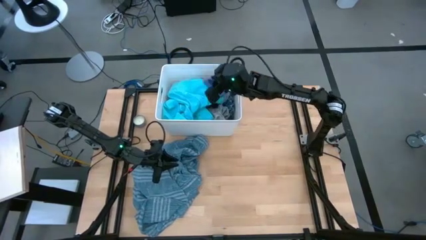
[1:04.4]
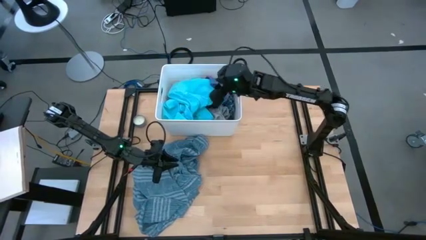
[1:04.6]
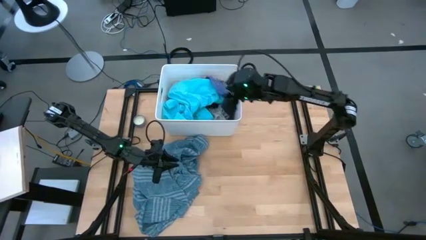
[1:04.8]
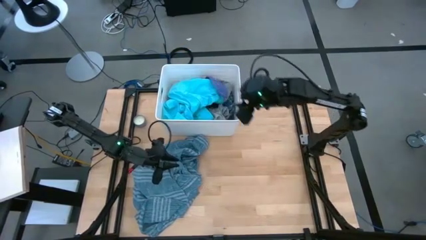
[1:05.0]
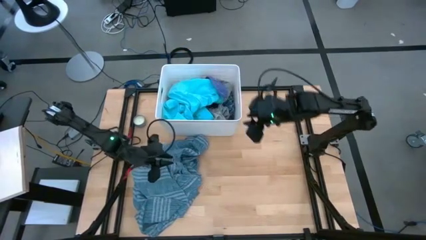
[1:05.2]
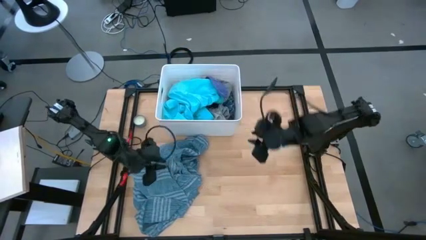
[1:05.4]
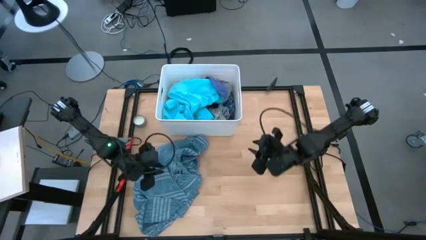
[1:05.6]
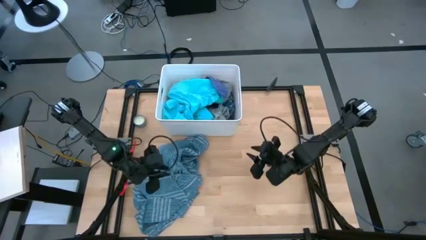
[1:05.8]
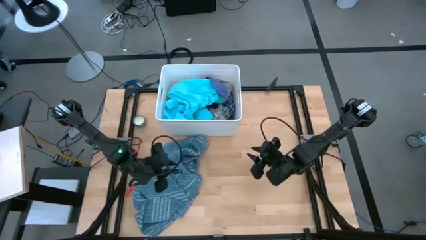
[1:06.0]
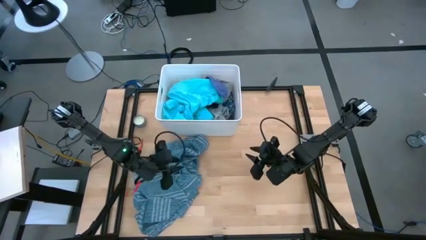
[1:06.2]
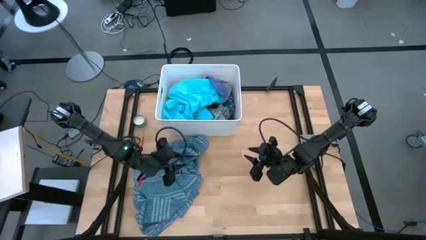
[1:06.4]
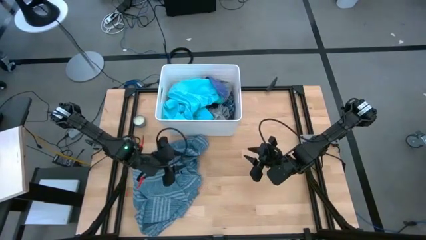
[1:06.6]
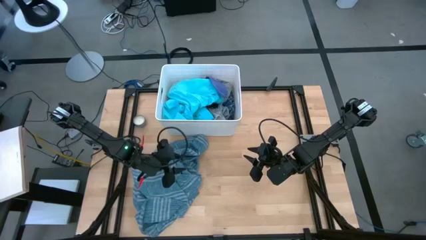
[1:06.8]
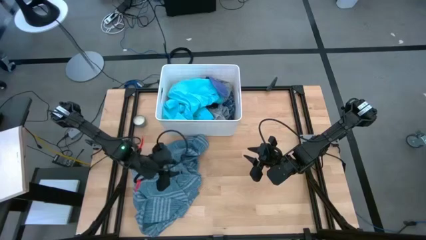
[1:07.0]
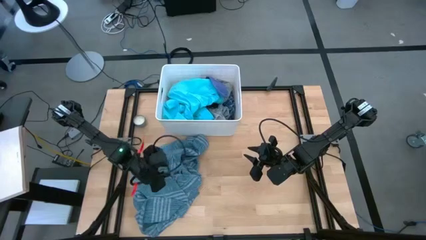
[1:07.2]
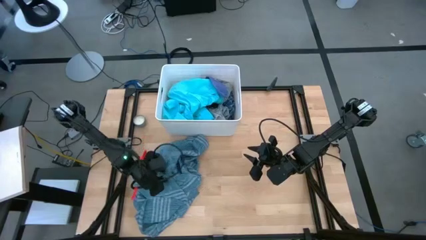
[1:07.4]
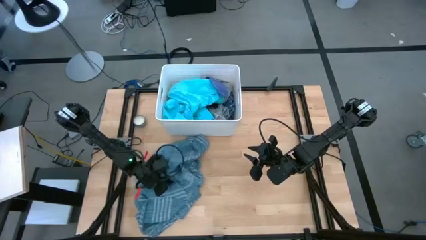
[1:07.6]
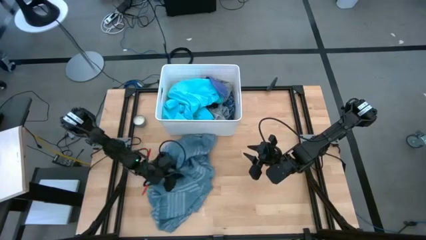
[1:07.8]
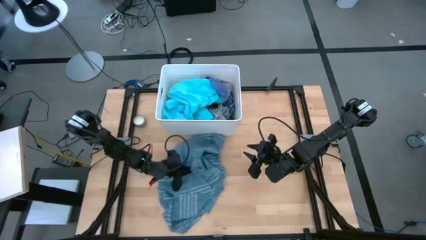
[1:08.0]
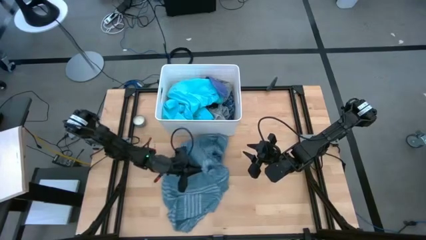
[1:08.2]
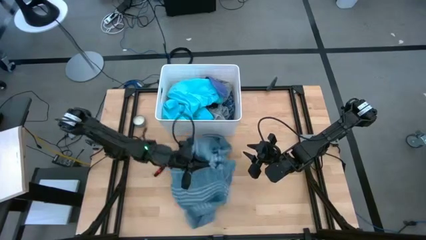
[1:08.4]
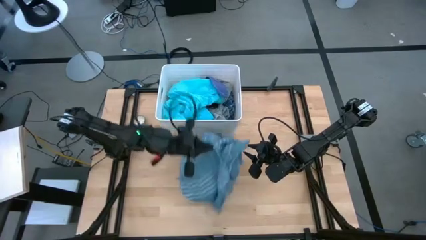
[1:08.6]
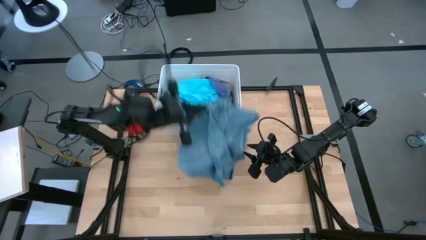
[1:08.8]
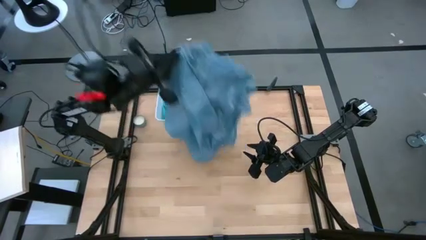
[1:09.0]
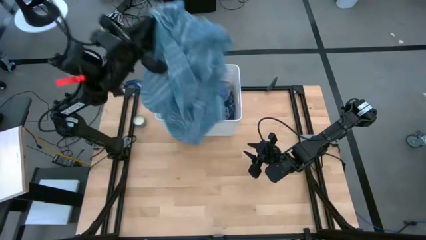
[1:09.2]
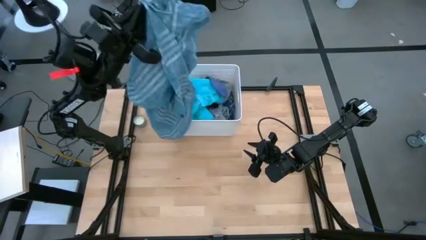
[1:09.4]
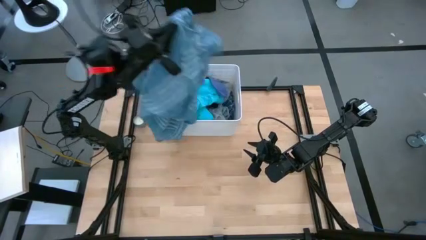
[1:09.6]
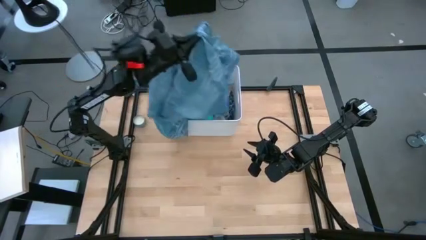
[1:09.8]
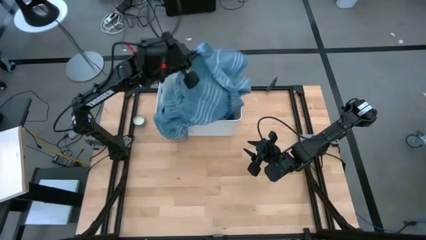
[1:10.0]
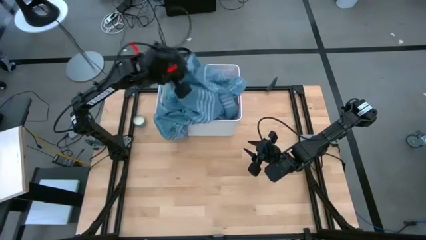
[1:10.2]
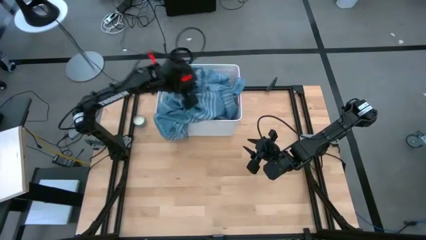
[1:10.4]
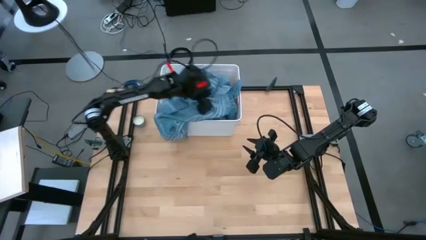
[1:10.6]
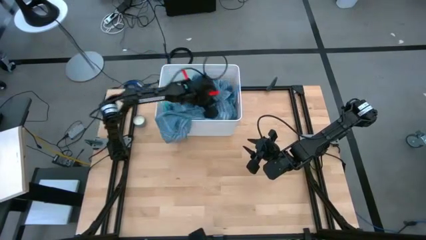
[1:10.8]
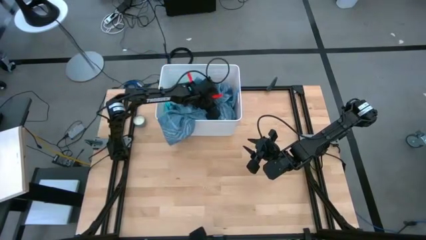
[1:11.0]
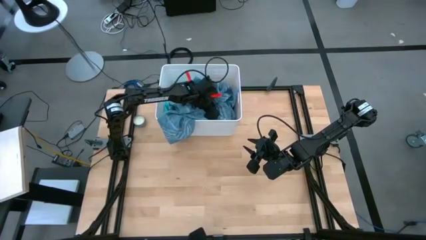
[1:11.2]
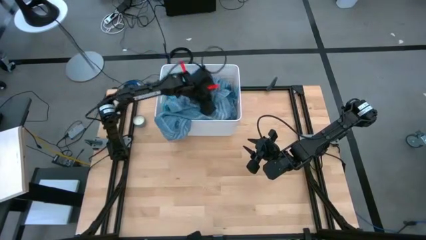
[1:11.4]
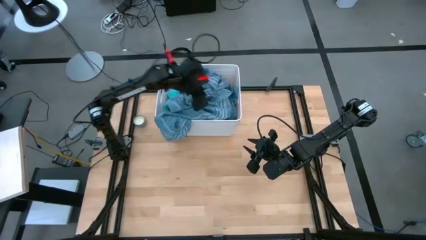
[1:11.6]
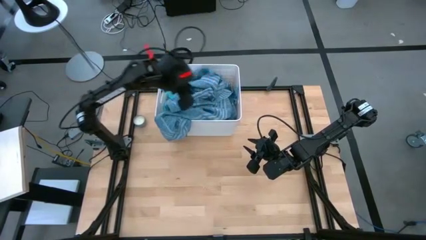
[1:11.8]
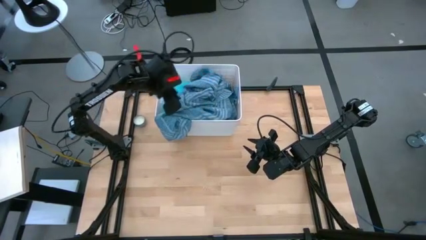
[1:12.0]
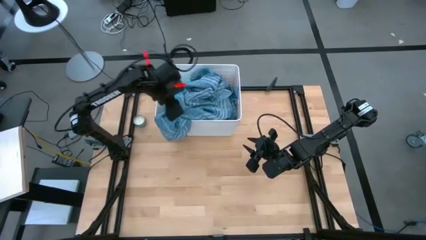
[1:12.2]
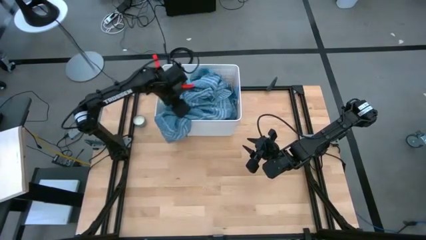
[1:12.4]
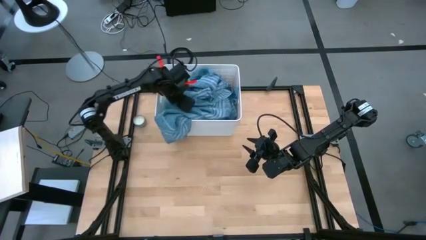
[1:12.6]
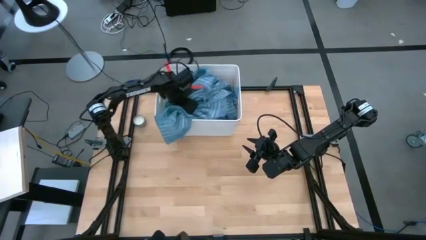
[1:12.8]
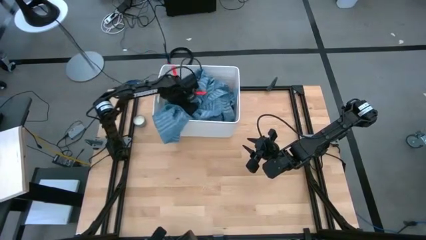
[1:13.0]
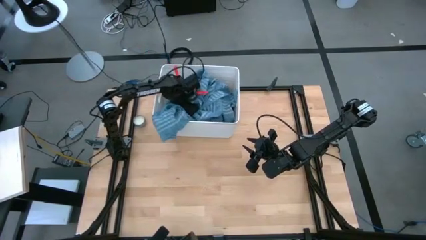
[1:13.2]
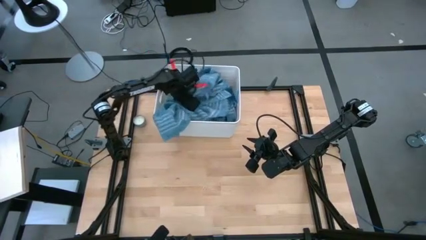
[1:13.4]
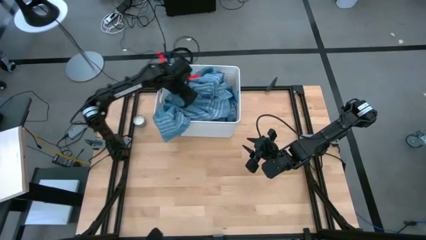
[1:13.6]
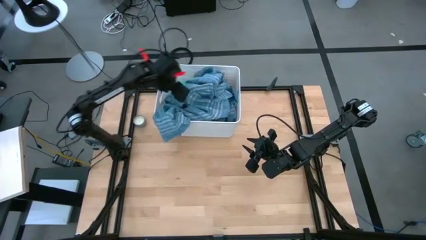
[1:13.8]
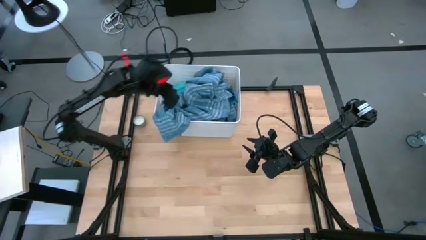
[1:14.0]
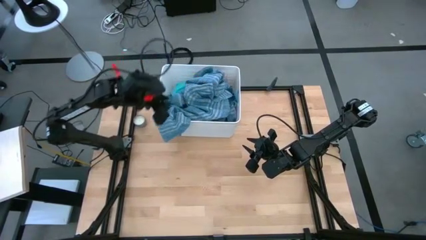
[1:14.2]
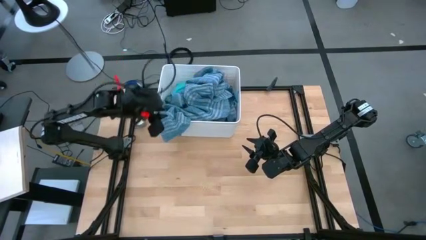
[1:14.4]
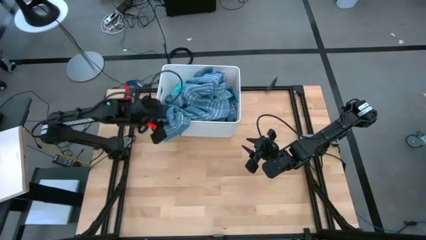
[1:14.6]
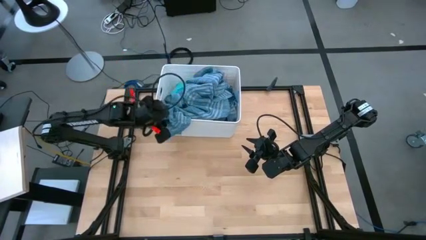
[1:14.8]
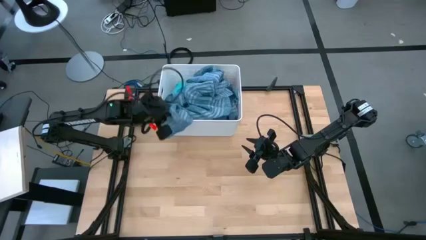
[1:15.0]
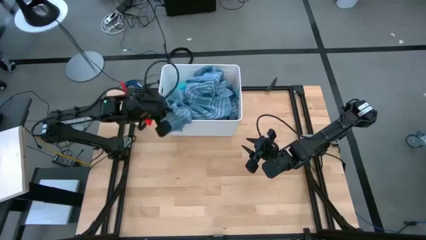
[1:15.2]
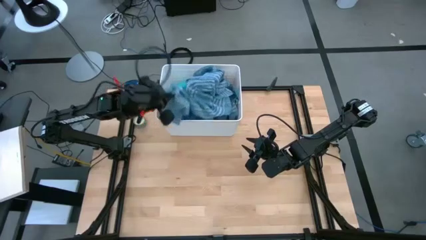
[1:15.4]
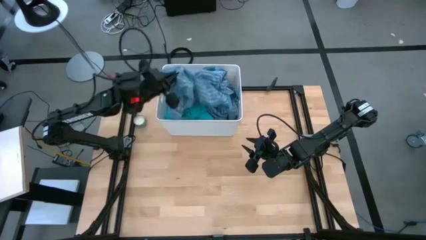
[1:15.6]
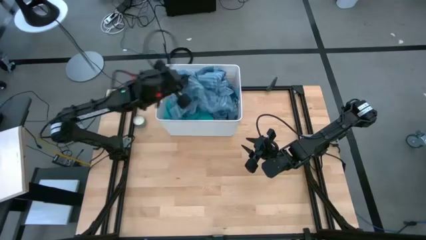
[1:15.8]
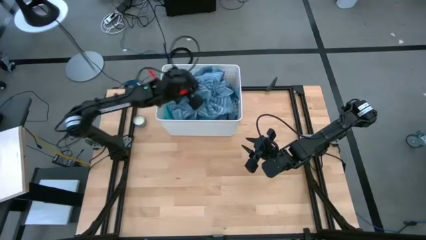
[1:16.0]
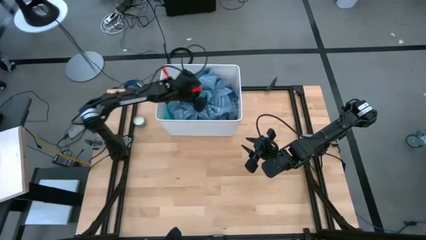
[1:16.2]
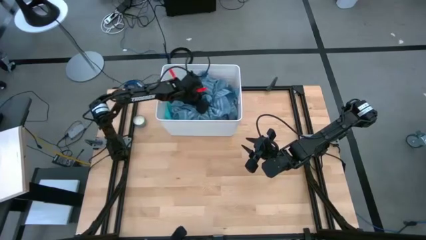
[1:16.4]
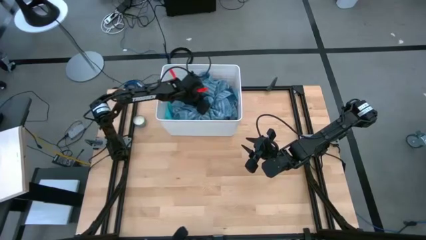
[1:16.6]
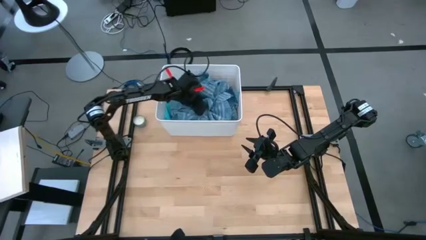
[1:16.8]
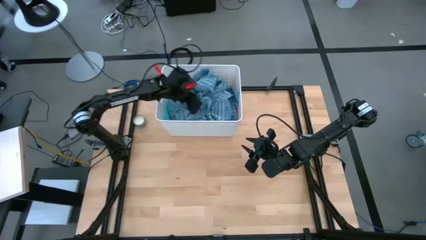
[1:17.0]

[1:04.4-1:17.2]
Task: Sort clothes
Put the blue-green checkered into the white laundry bin
